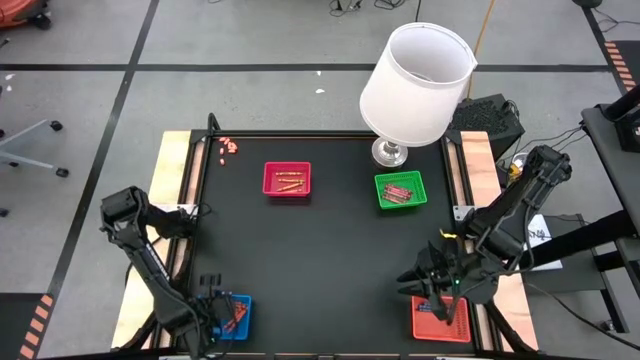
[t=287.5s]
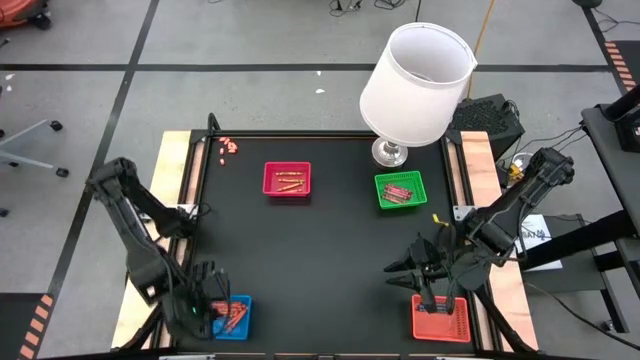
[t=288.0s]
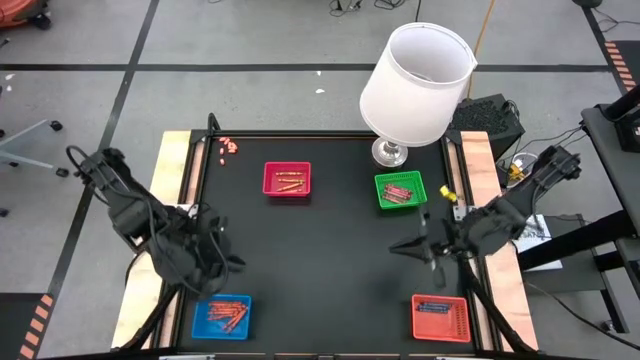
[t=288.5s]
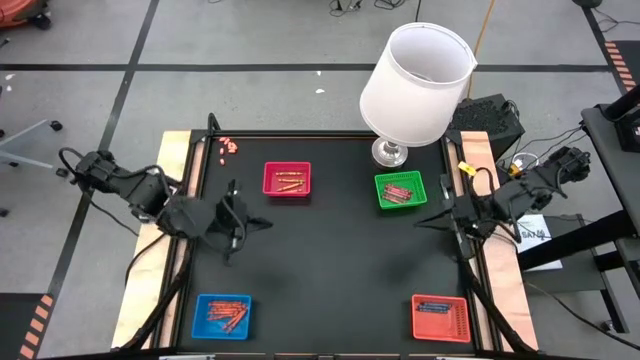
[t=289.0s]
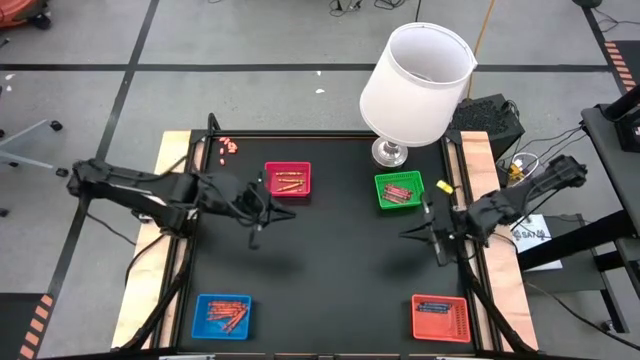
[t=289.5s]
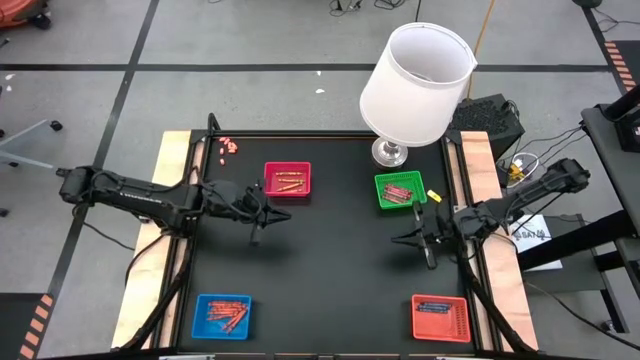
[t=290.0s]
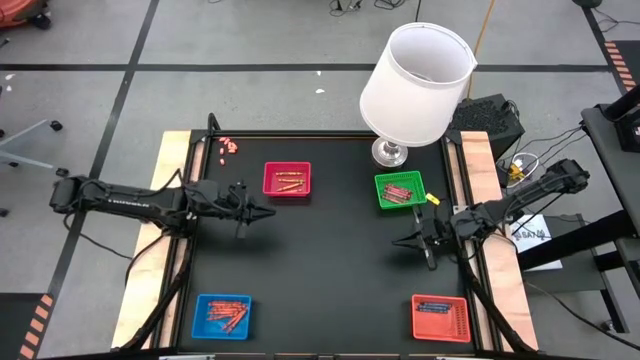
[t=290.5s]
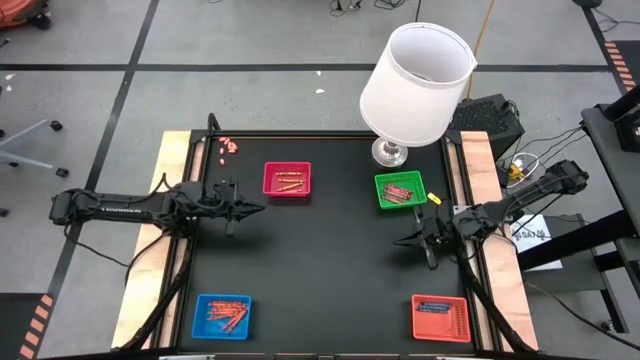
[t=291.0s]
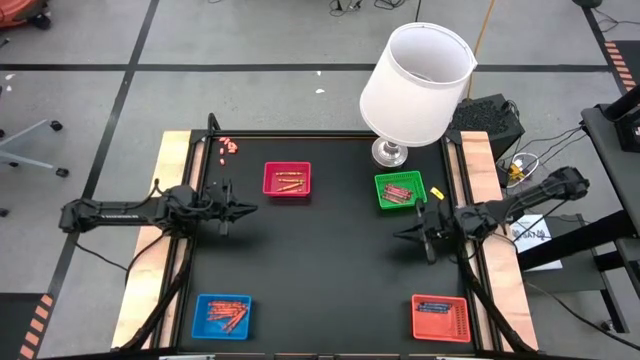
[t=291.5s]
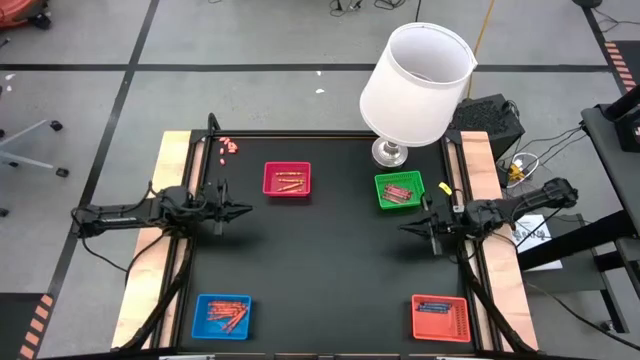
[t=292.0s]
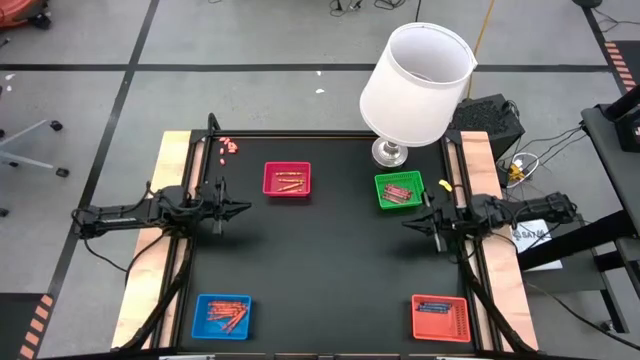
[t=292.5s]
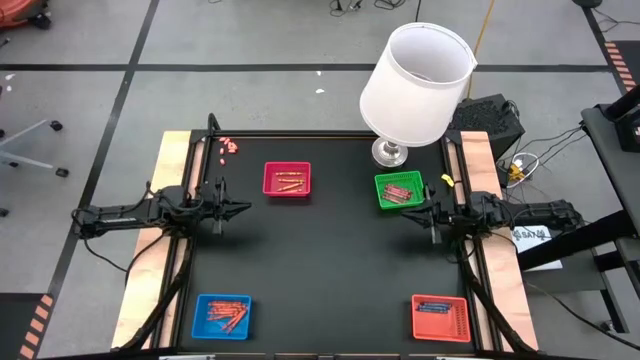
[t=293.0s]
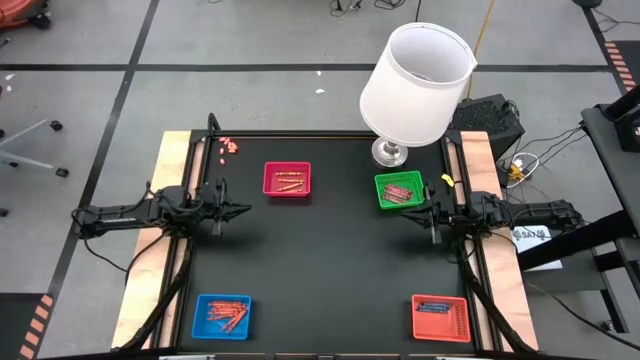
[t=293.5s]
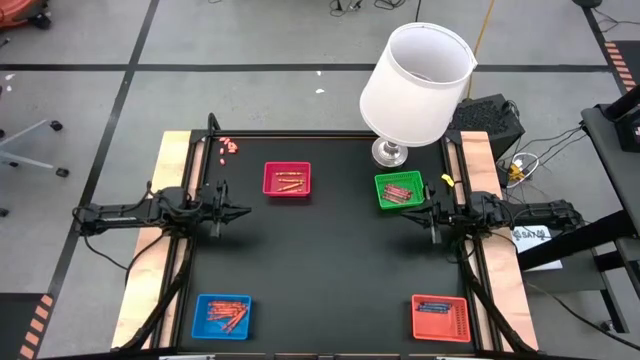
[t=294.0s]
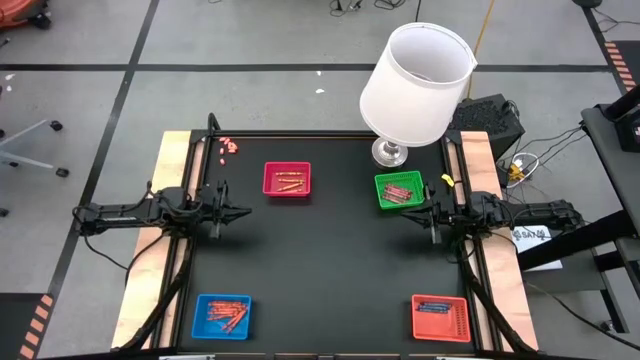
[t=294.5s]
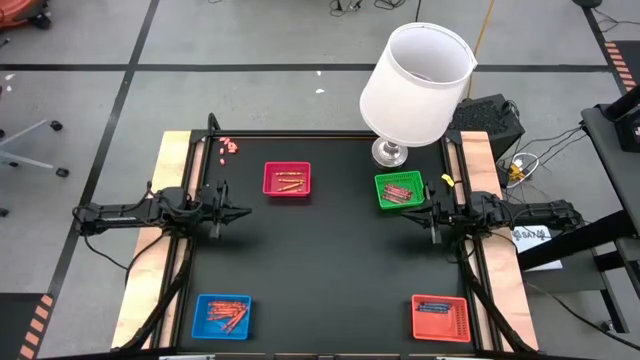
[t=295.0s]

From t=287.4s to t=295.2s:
Task: Sort crayons
Return to Home Position

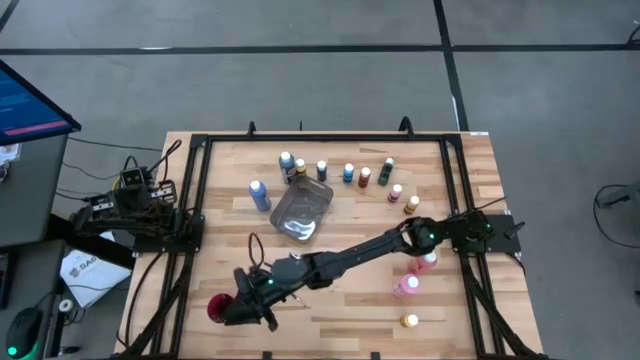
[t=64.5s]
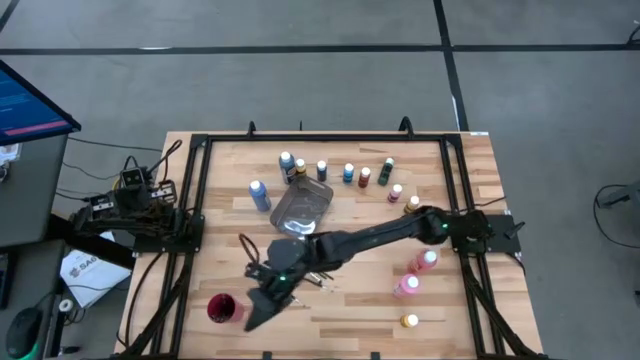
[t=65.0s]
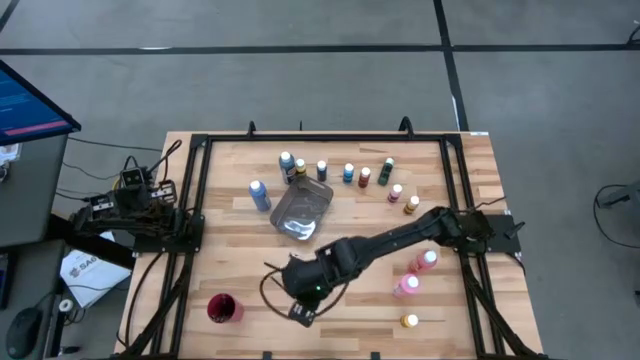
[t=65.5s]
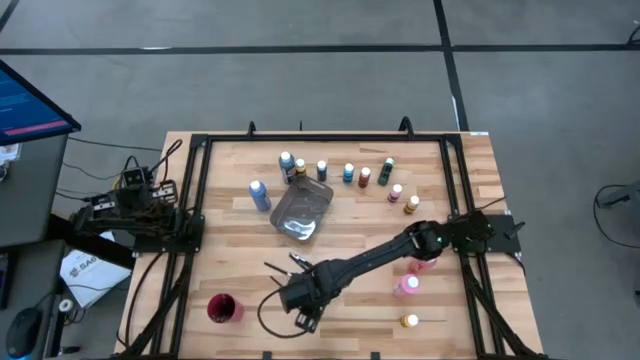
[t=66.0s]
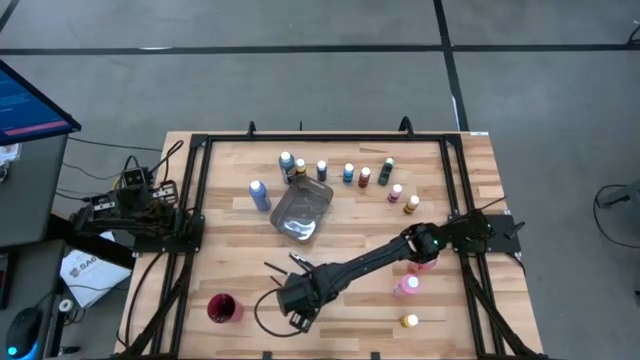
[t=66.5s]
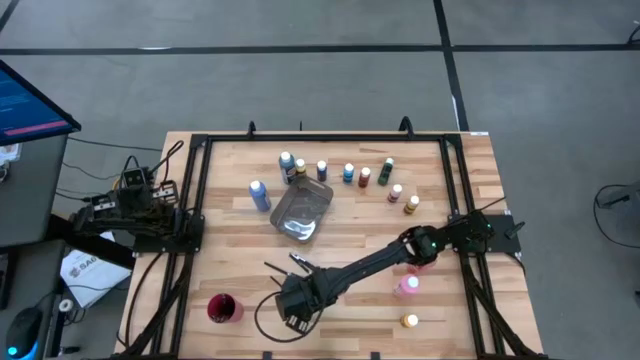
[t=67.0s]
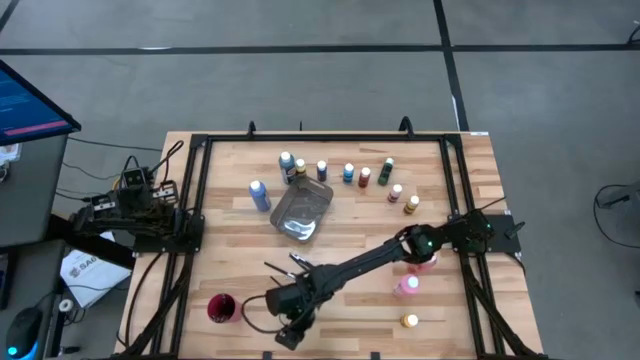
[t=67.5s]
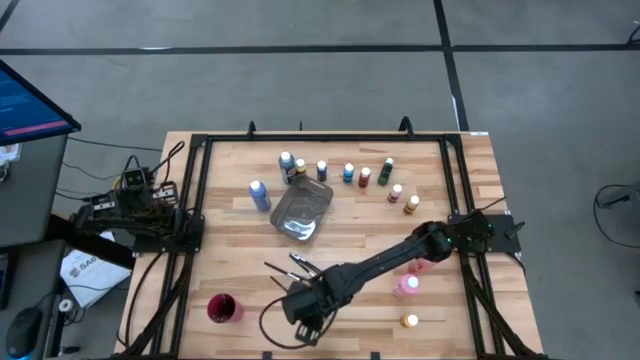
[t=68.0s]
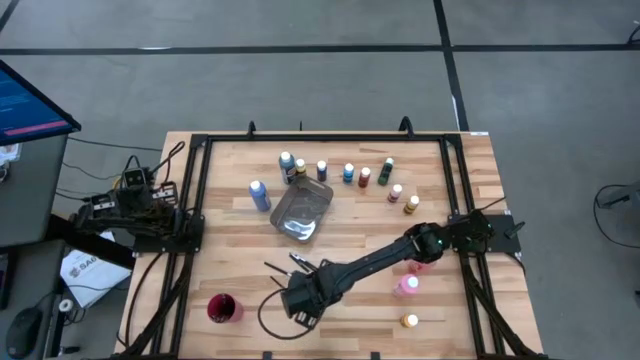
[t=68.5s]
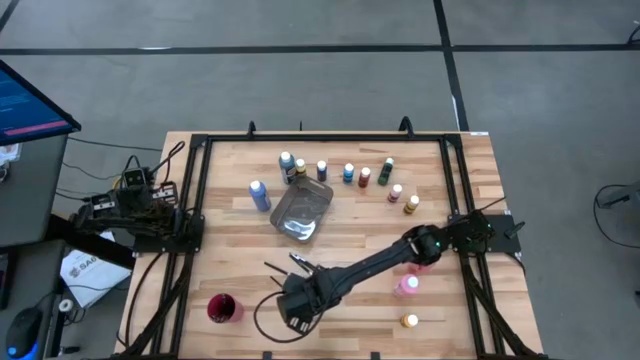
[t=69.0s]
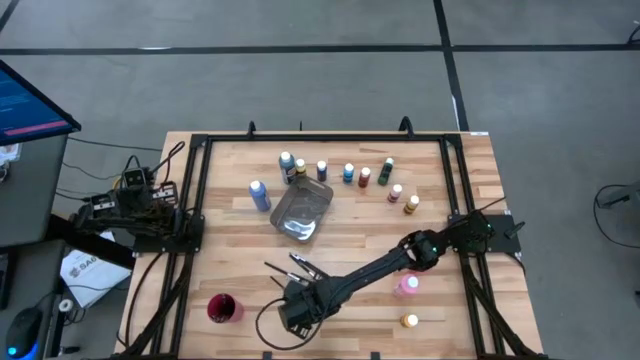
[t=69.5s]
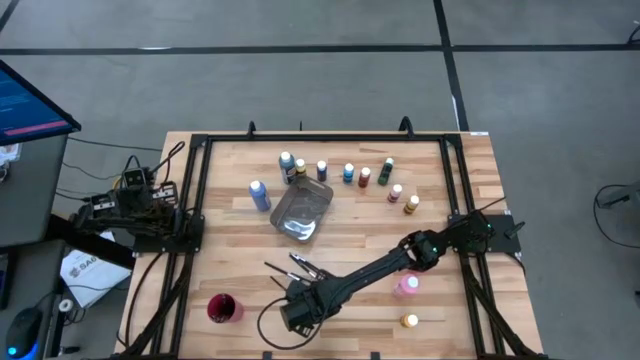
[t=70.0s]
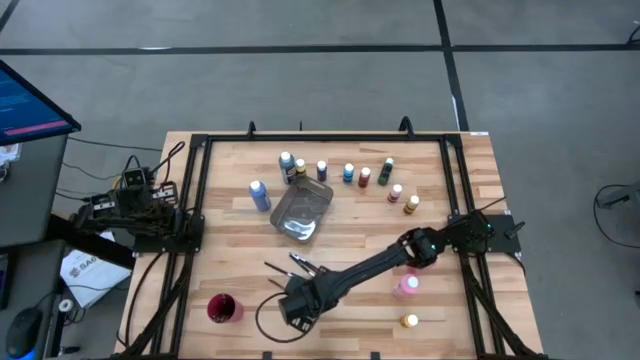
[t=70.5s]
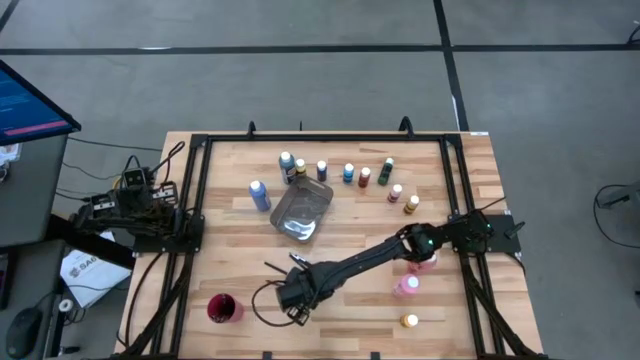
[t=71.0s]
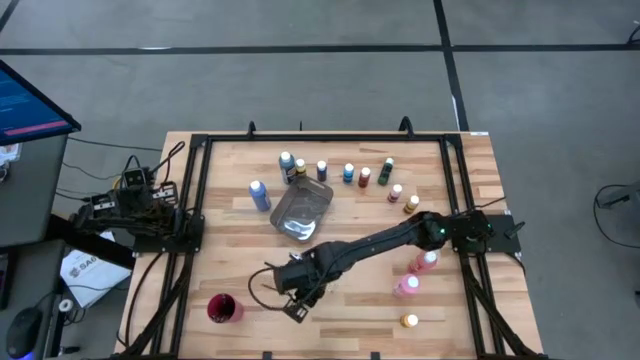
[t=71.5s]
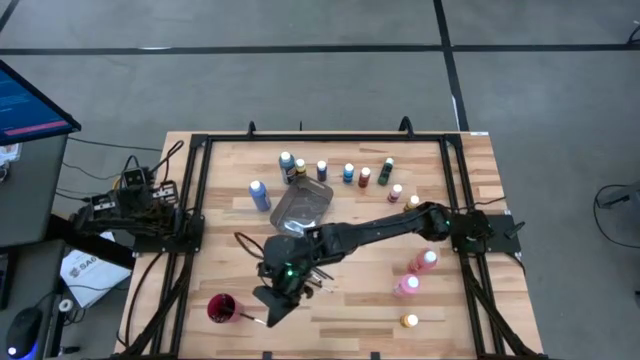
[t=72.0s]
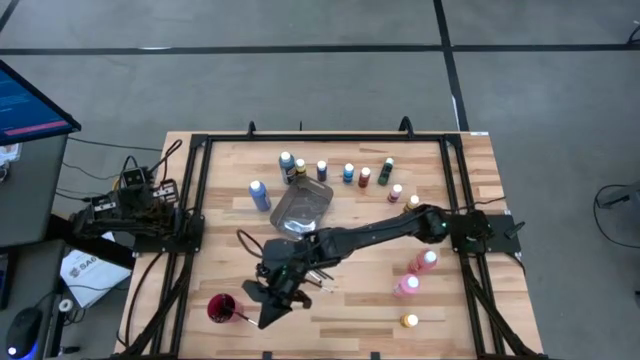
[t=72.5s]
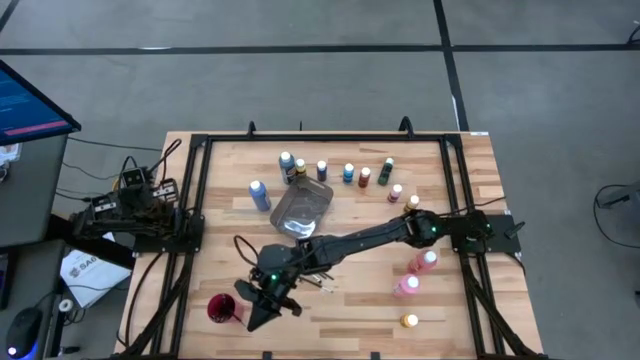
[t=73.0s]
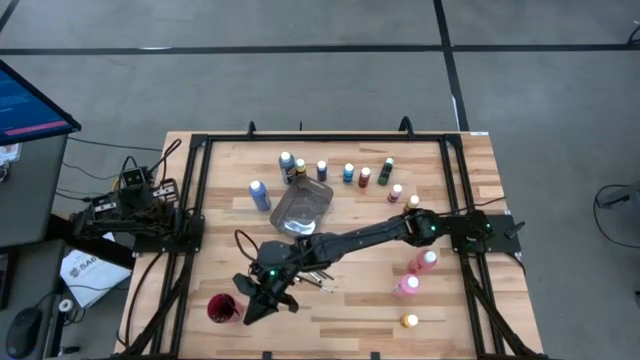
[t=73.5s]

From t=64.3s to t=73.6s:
Task: Pick & Place Paint Supplies
Put the silver paintbrush into the red cup

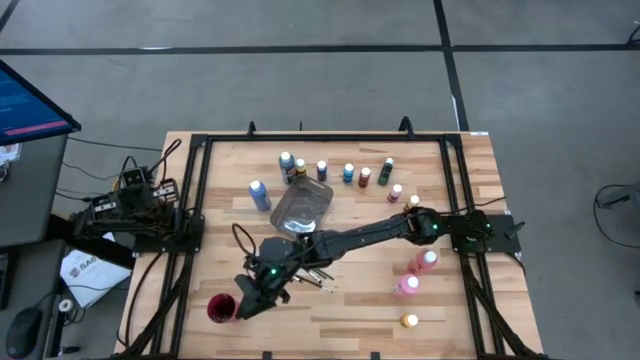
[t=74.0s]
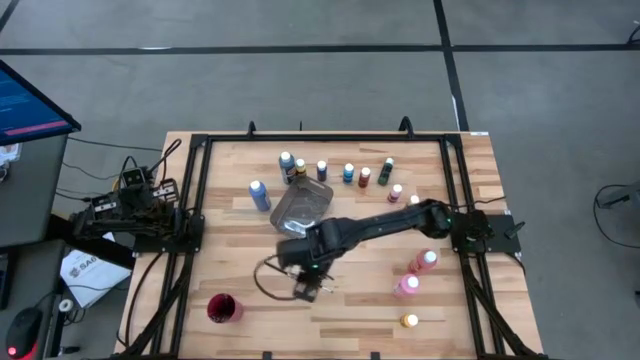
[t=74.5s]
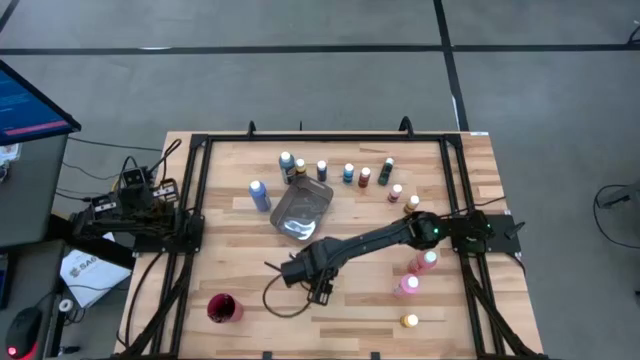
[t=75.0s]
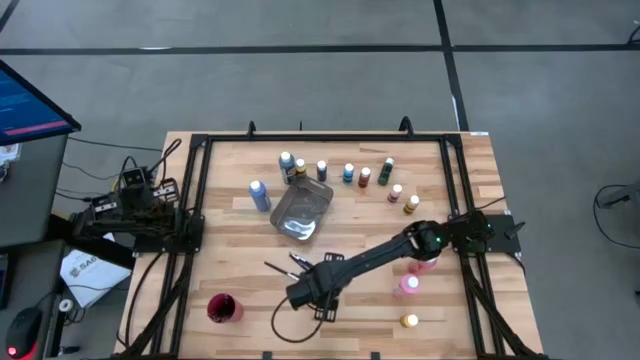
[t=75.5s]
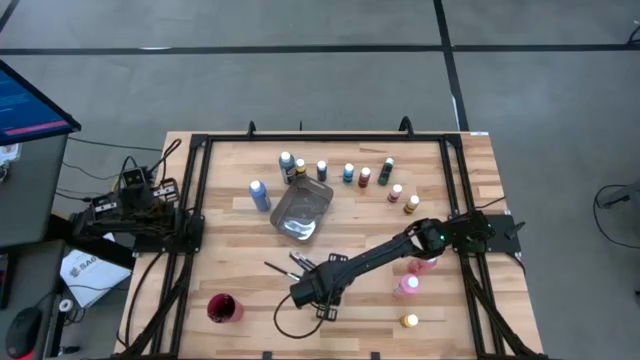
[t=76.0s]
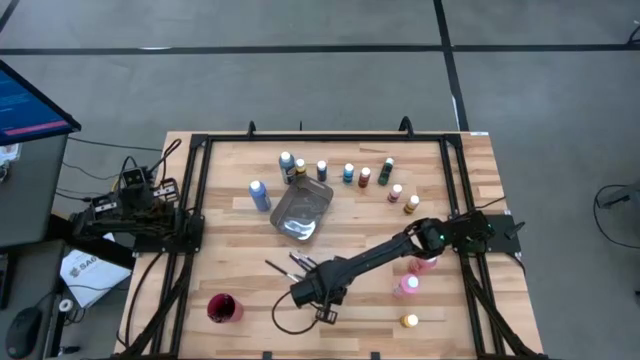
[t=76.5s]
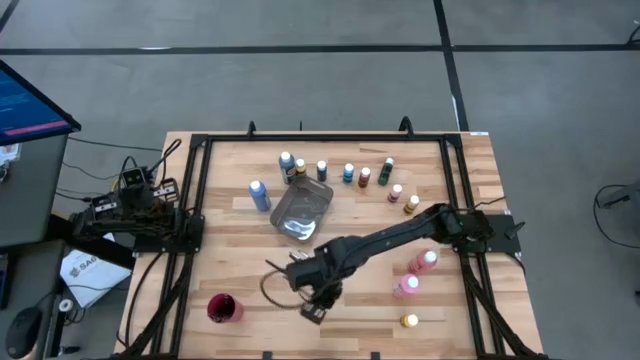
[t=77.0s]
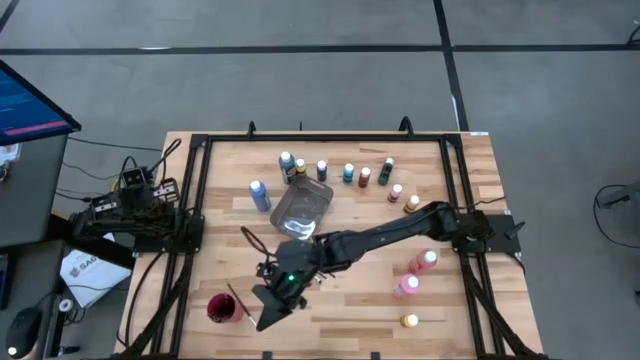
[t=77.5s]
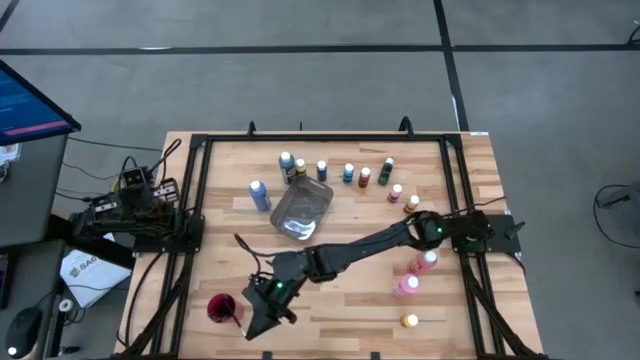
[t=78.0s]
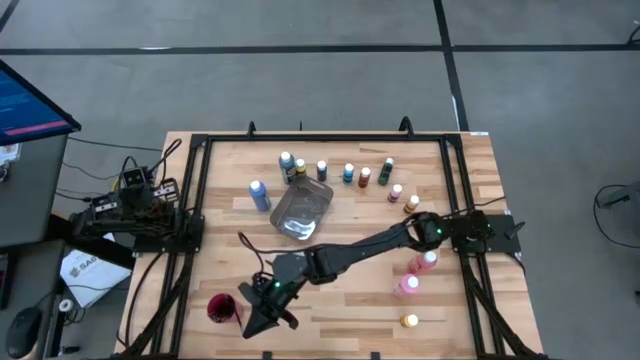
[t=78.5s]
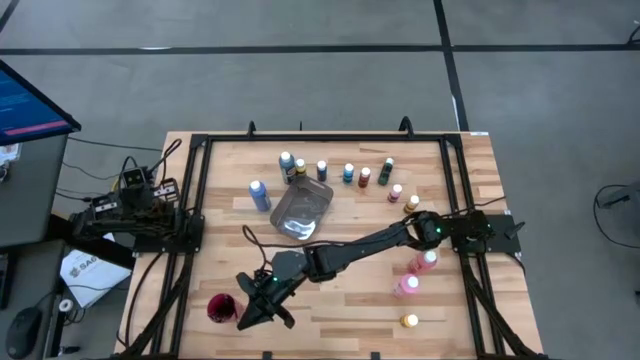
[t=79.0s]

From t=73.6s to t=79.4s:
Put the silver paintbrush into the red cup
